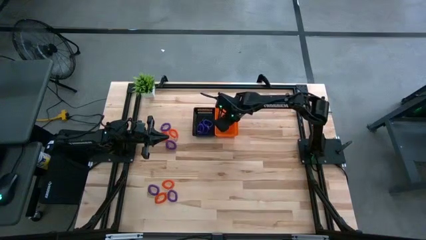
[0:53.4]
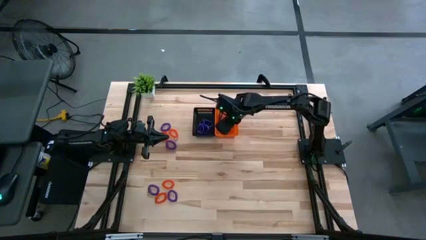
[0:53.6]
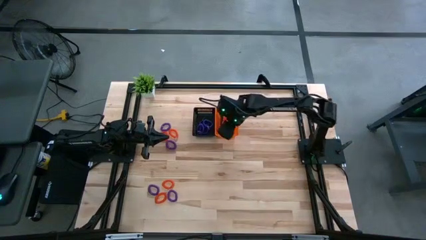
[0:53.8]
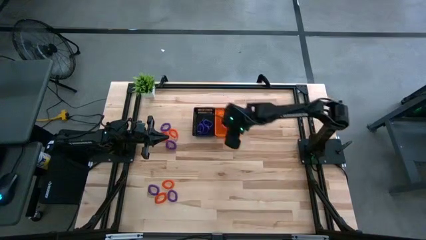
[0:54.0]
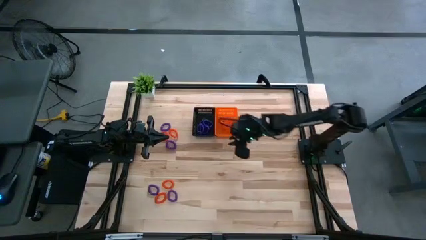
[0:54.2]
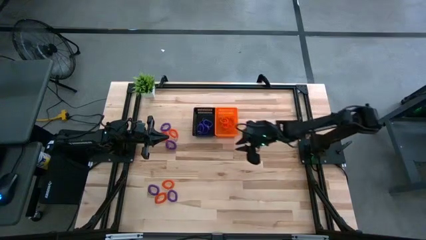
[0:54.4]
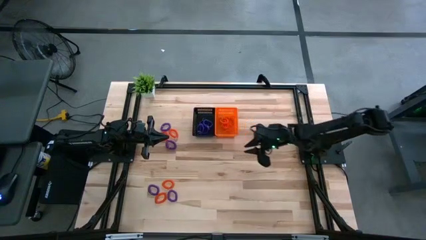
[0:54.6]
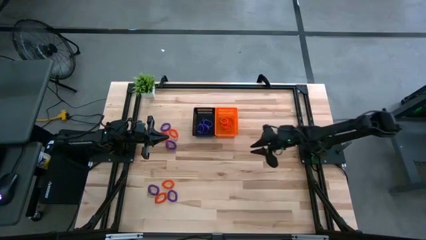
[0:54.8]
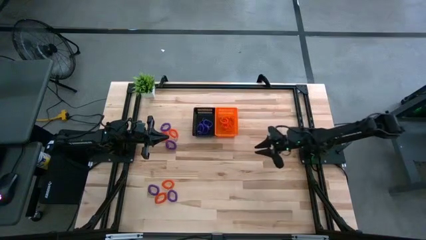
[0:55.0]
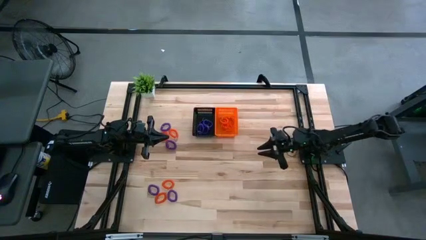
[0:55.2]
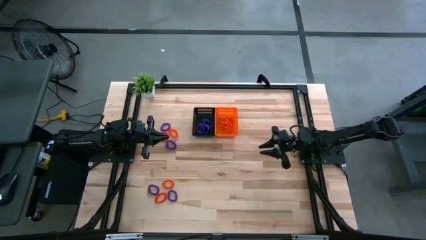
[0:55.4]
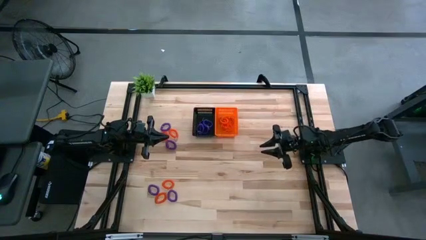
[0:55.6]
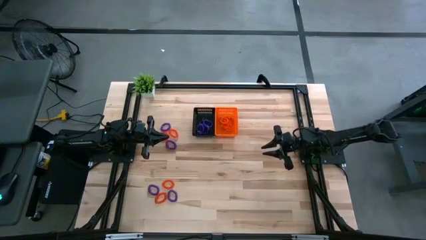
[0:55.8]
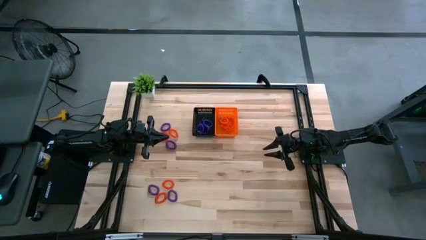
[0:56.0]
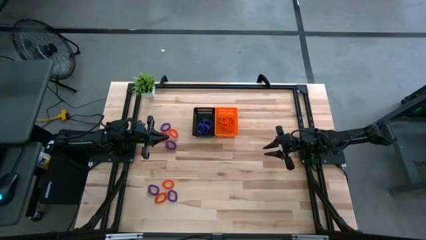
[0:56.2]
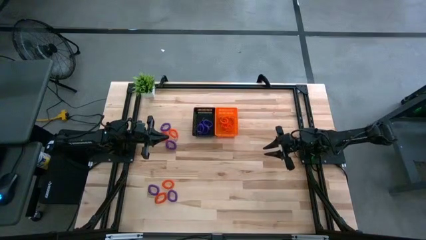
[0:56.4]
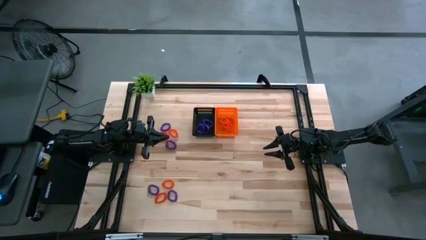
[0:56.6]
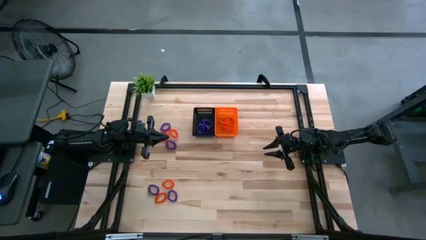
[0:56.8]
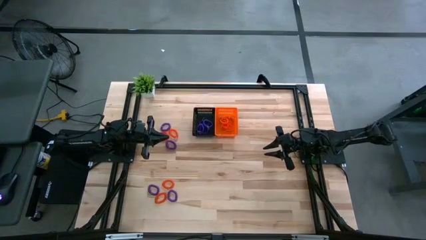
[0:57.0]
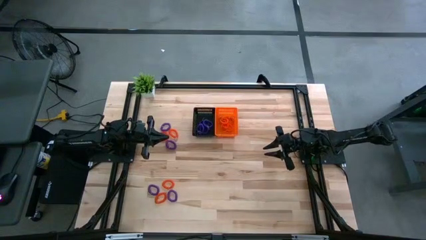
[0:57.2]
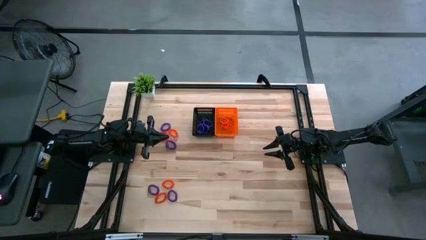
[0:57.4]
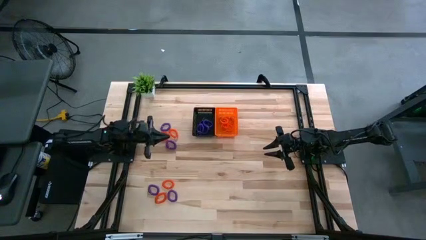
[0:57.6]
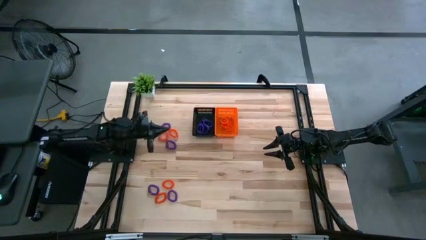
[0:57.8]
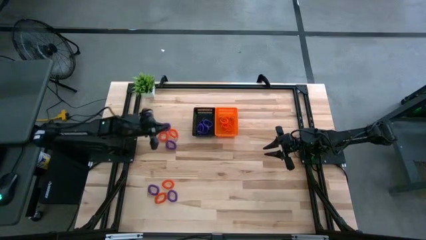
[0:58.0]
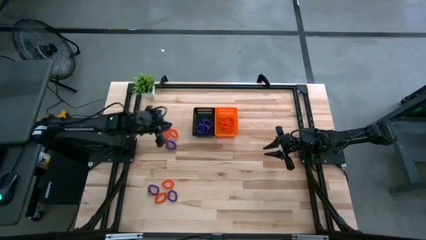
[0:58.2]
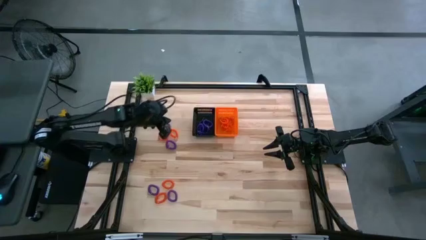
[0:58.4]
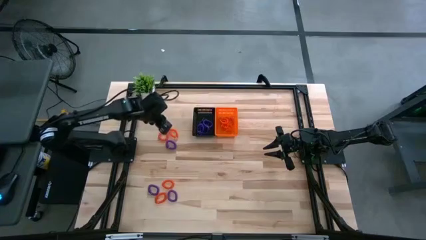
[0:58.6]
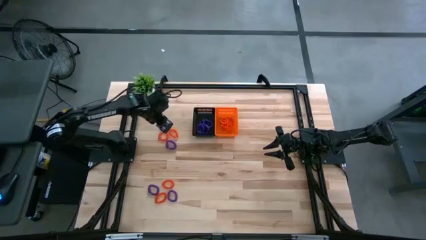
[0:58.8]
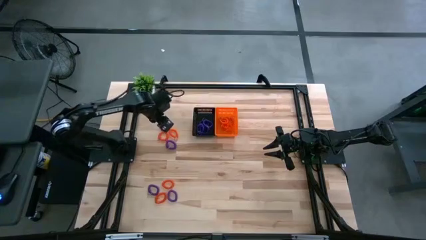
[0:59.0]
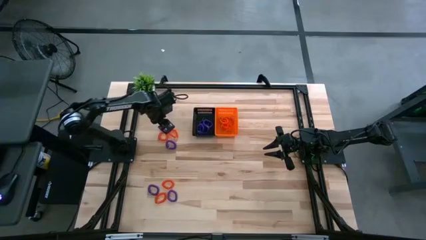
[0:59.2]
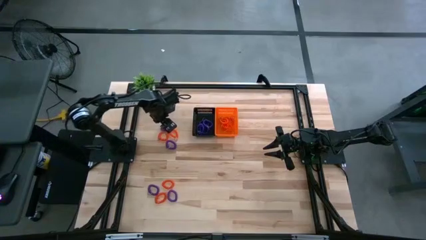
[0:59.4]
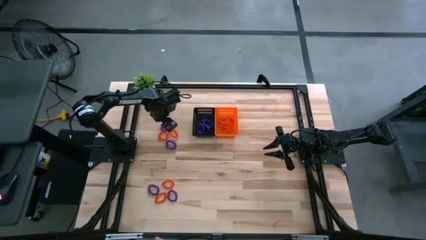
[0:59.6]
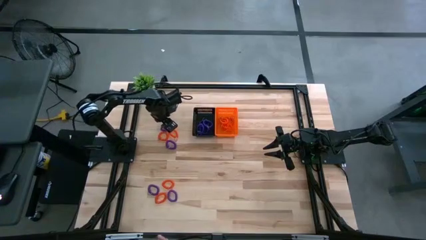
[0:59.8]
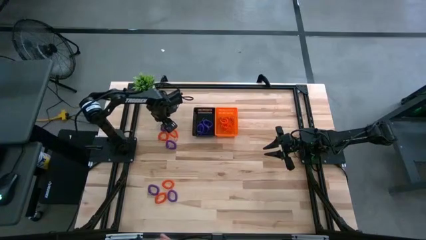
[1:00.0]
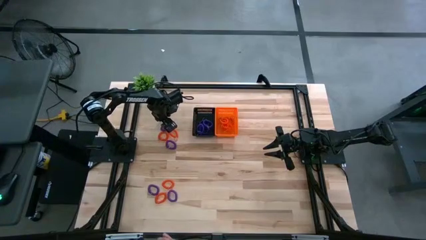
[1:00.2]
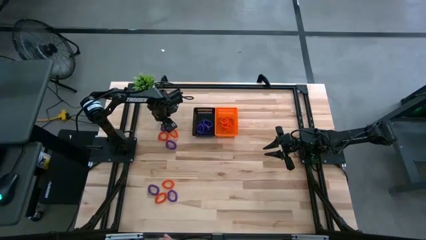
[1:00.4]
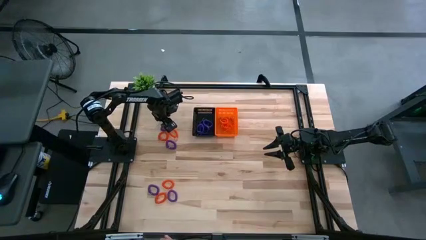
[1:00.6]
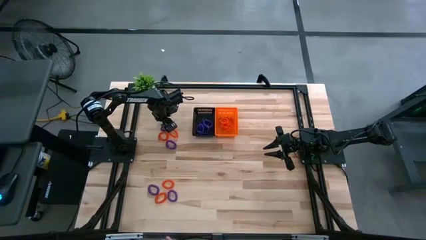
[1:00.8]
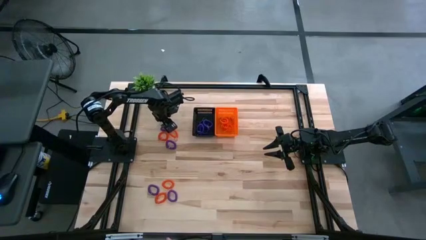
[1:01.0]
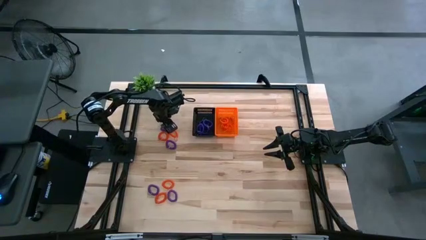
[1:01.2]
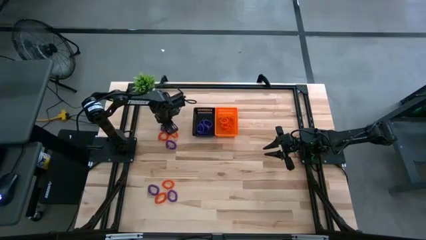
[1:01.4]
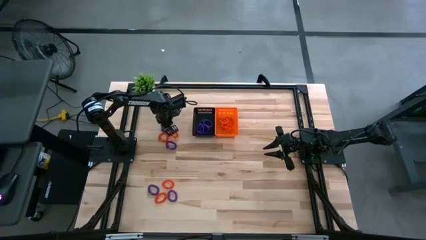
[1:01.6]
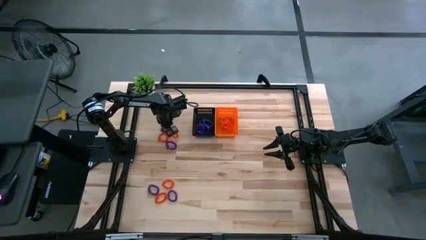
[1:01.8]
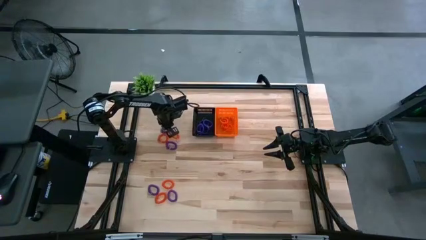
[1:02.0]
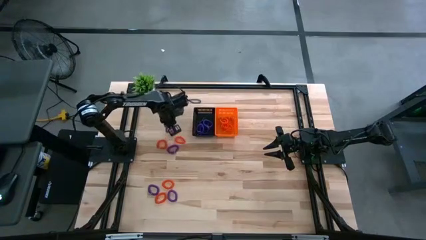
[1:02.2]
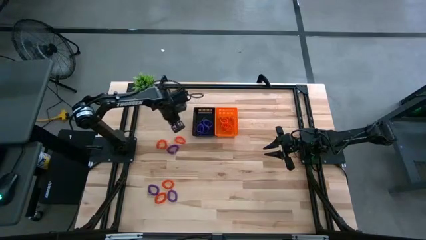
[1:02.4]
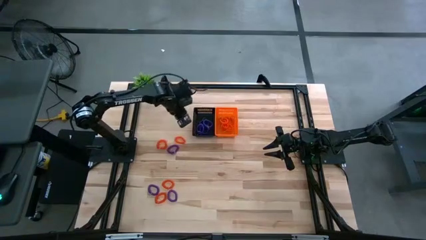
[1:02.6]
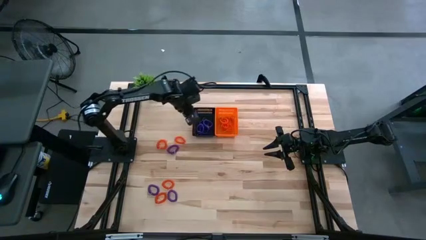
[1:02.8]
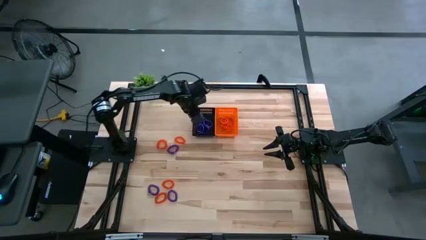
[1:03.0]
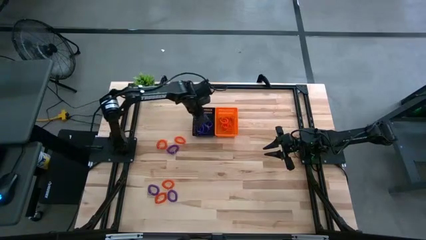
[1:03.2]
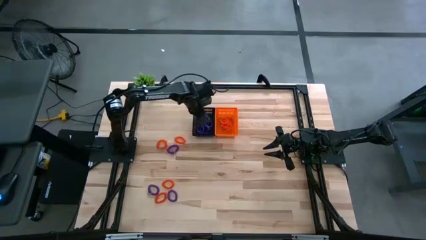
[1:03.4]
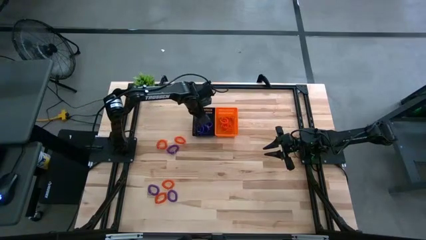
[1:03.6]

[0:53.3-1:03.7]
Task: Sort spring keychains into baskets
Put the purple spring keychain into the black basket

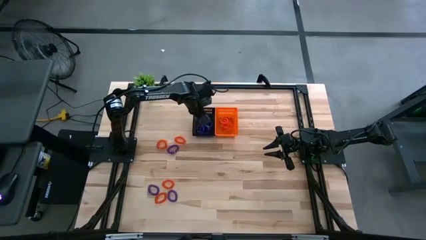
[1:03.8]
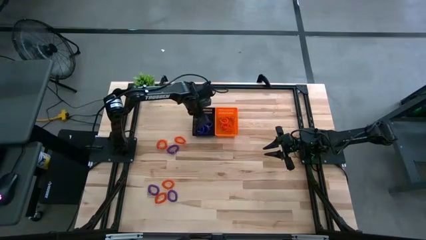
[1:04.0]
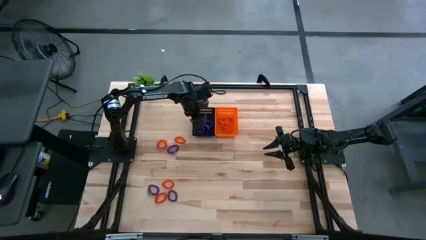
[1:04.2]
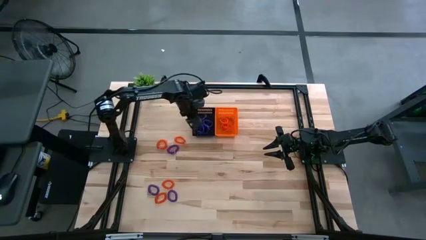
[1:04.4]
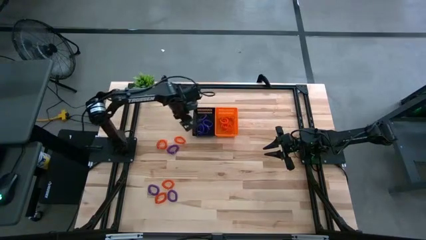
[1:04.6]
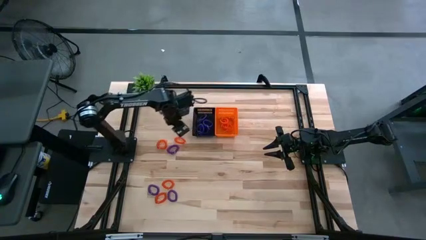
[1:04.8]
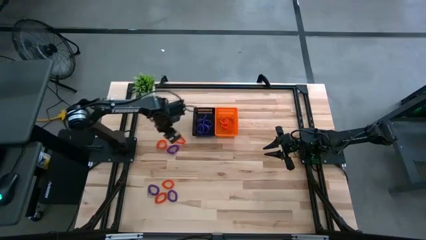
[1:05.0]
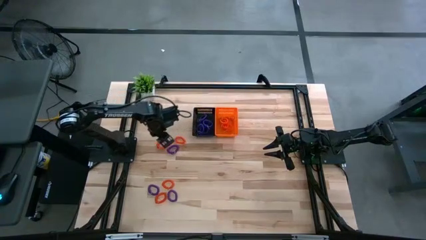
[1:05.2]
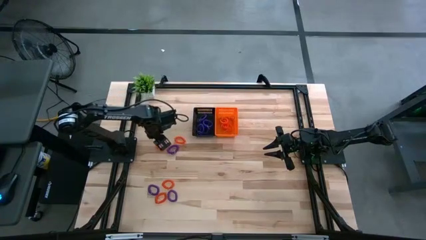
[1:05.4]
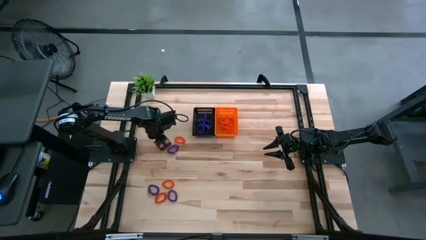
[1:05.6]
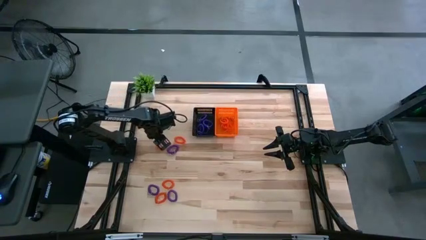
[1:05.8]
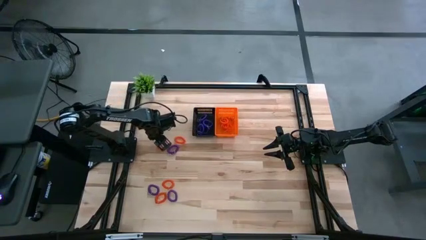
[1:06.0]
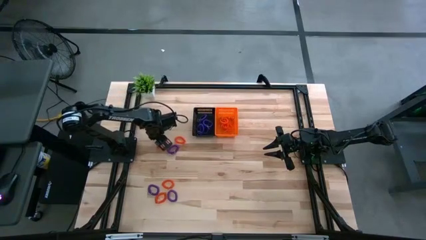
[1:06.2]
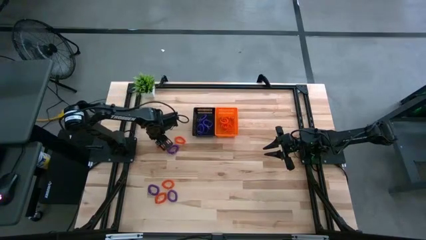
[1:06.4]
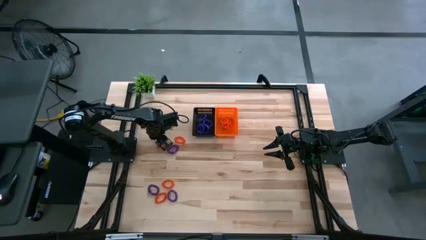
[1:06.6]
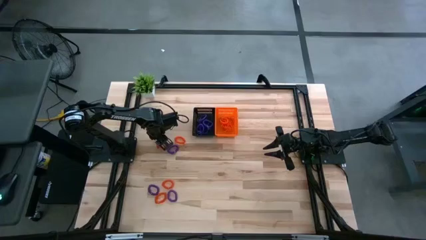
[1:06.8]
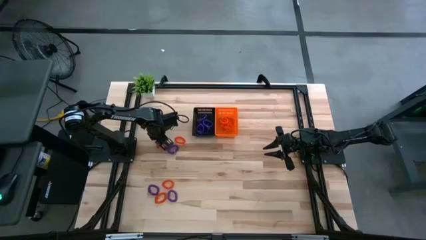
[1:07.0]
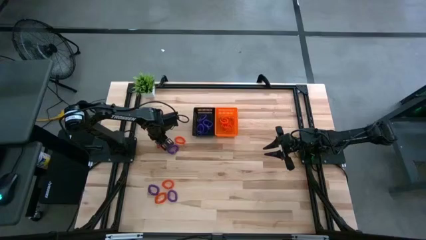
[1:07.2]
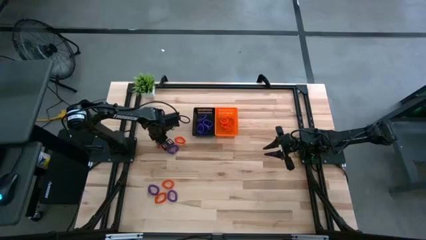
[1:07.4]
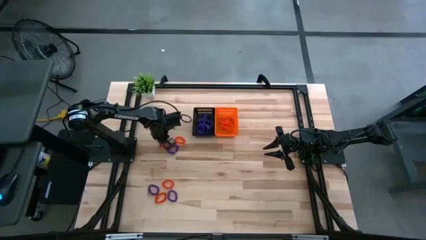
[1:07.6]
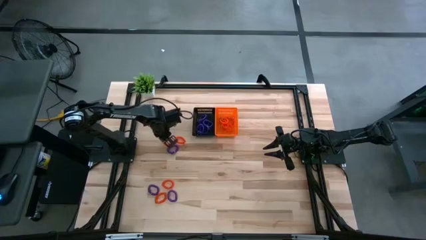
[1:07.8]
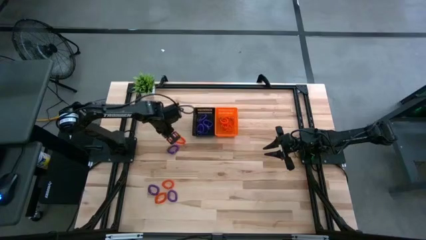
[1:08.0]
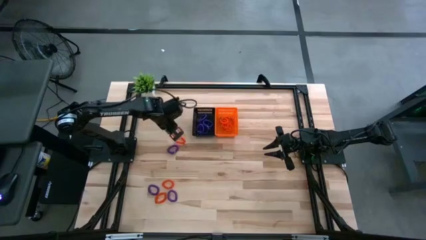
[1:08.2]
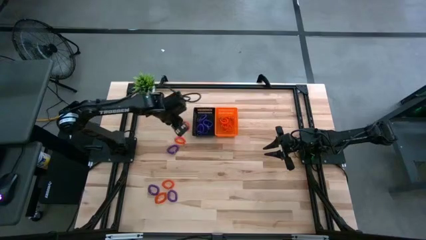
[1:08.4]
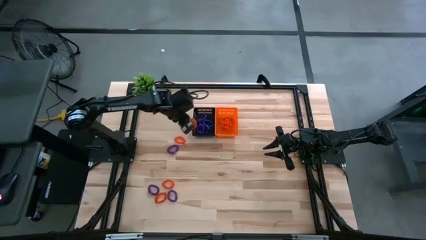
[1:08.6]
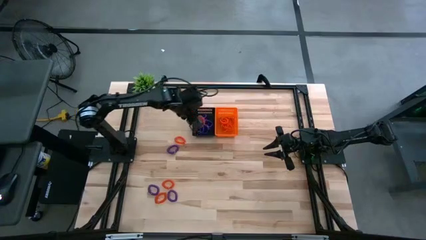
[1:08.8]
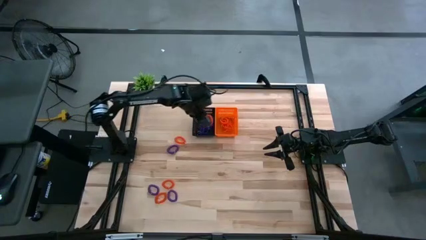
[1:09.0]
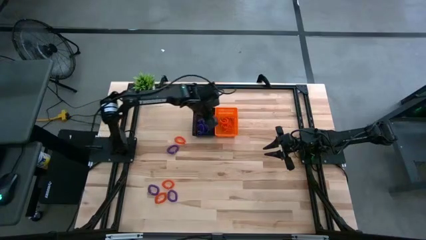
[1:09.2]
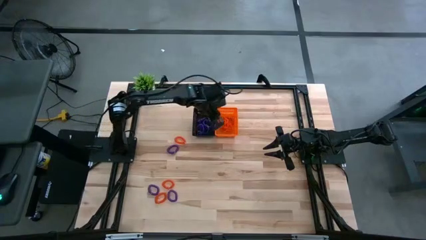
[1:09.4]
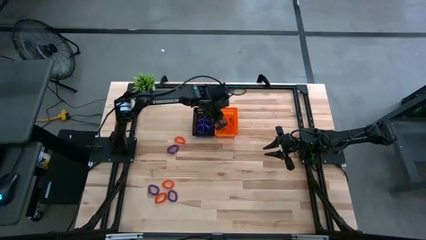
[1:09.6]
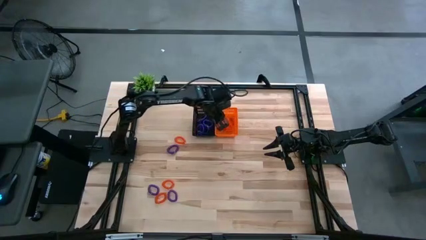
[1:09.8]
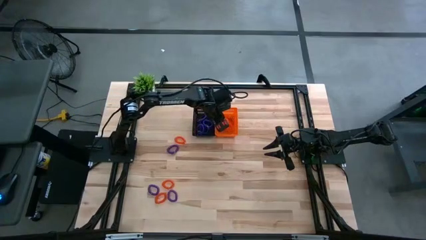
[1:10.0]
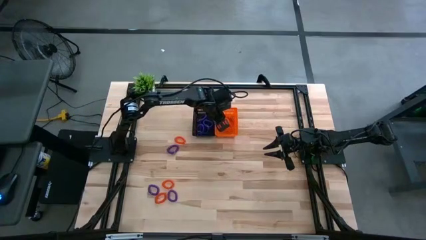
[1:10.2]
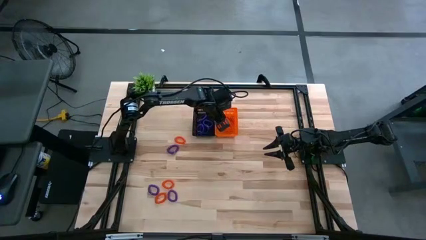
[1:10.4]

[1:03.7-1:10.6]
Put the orange spring keychain into the orange basket
